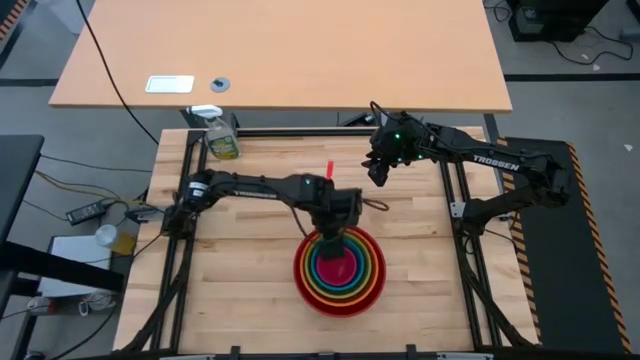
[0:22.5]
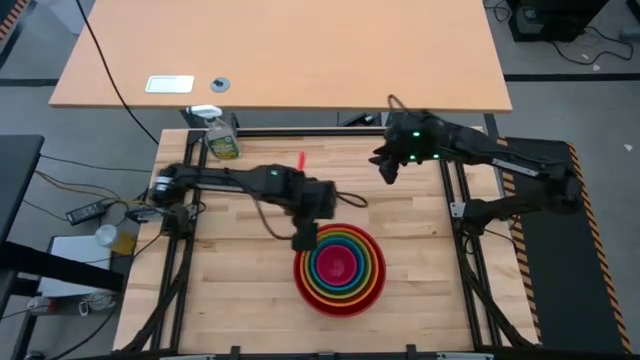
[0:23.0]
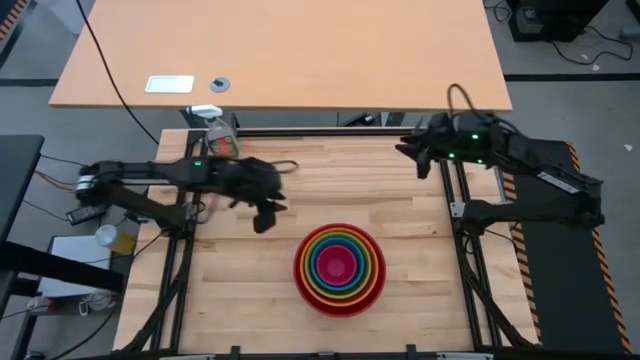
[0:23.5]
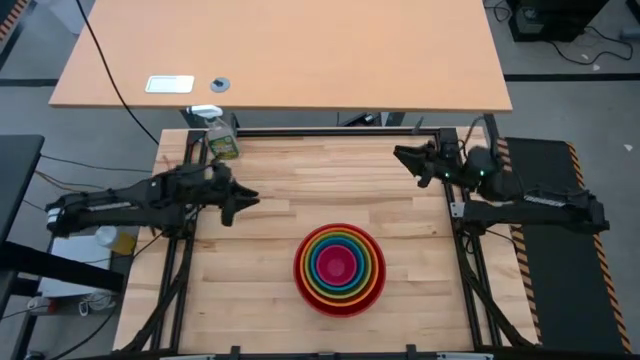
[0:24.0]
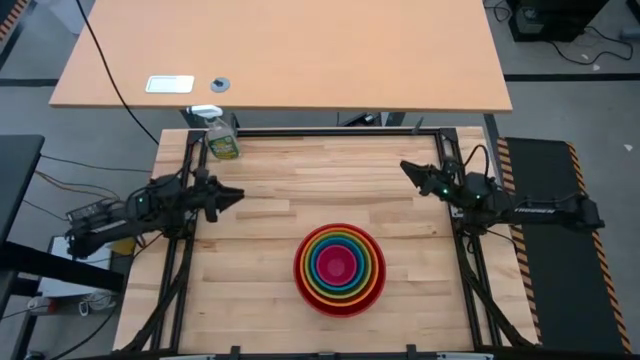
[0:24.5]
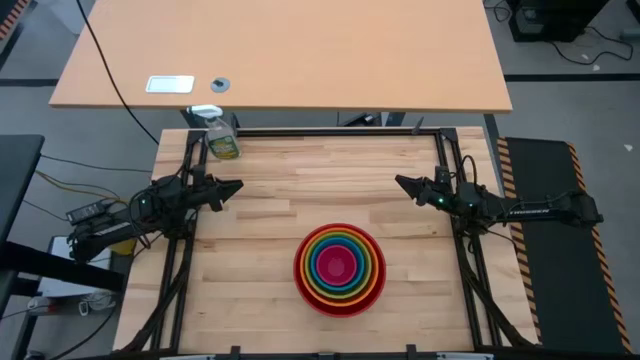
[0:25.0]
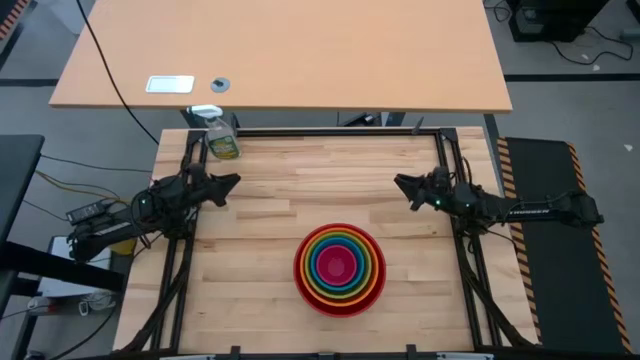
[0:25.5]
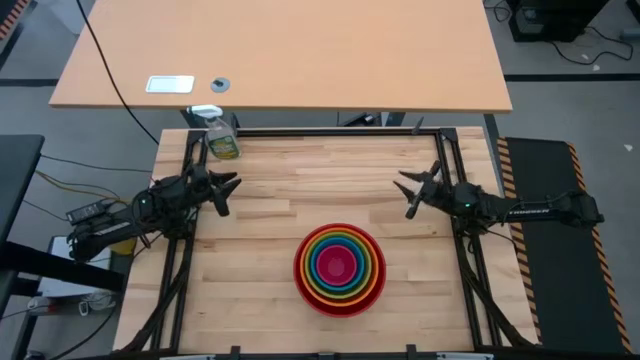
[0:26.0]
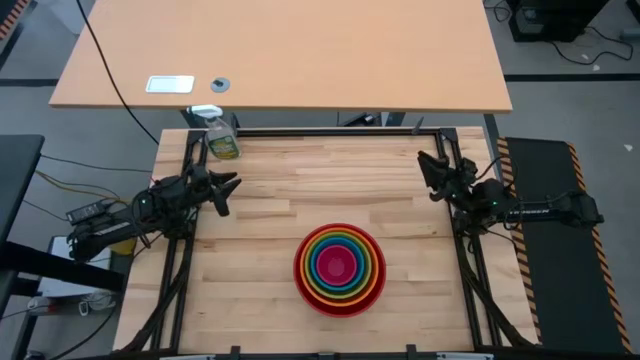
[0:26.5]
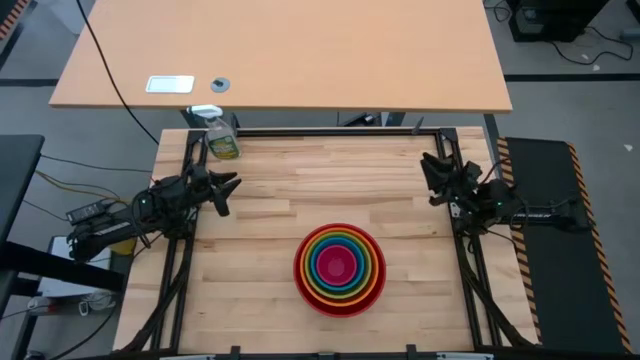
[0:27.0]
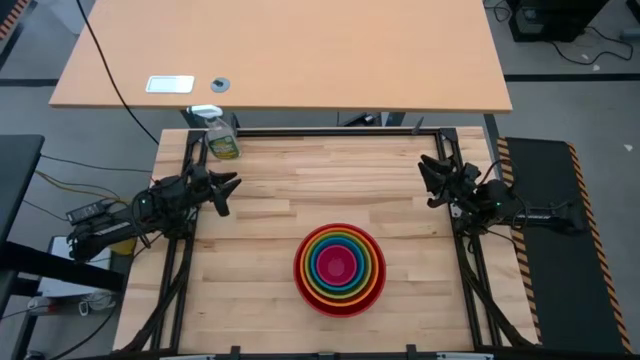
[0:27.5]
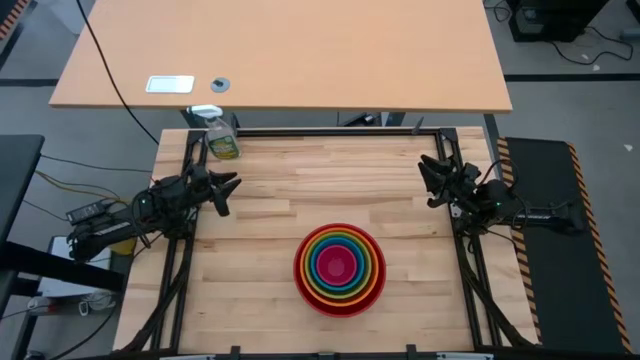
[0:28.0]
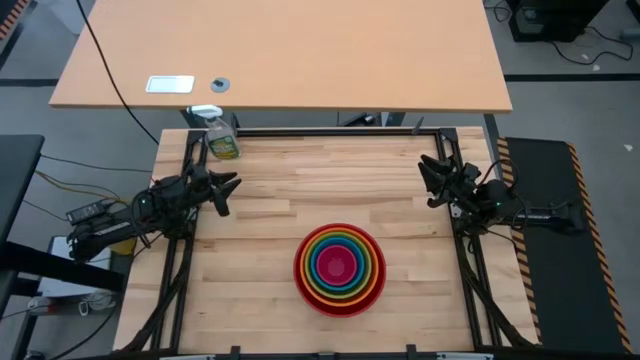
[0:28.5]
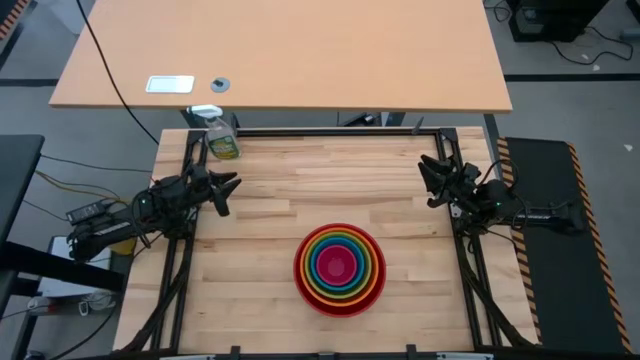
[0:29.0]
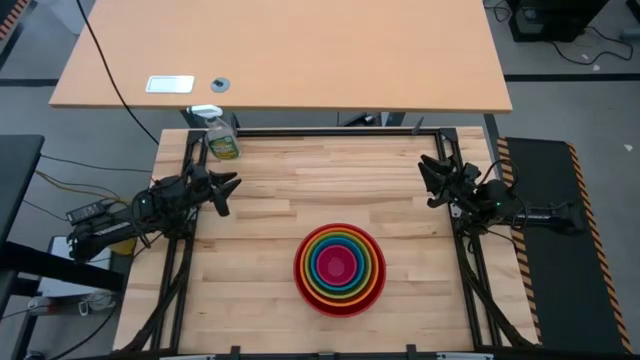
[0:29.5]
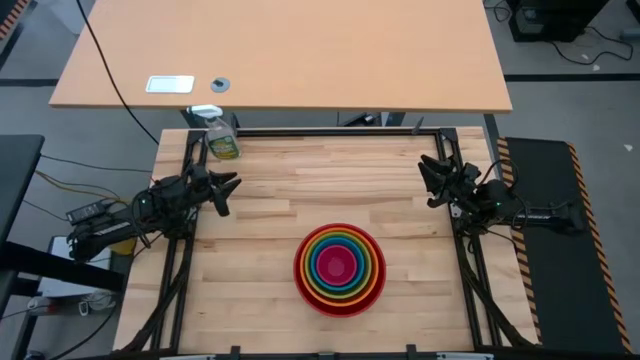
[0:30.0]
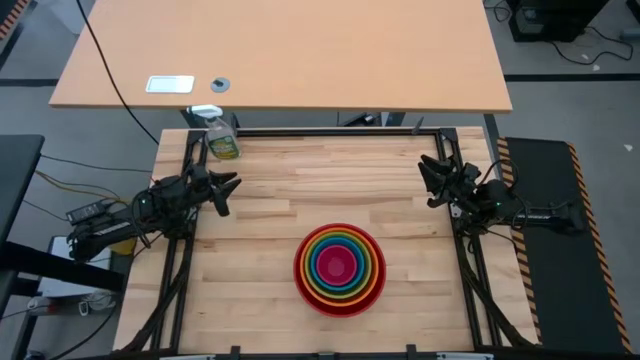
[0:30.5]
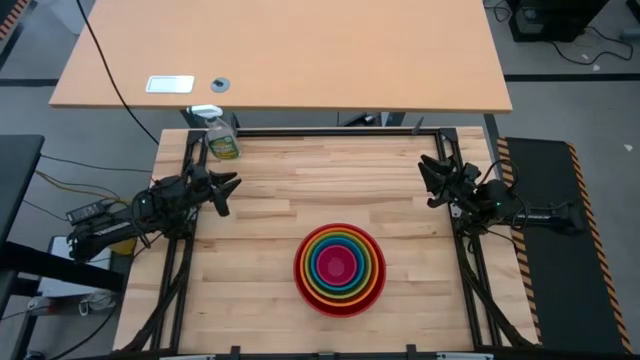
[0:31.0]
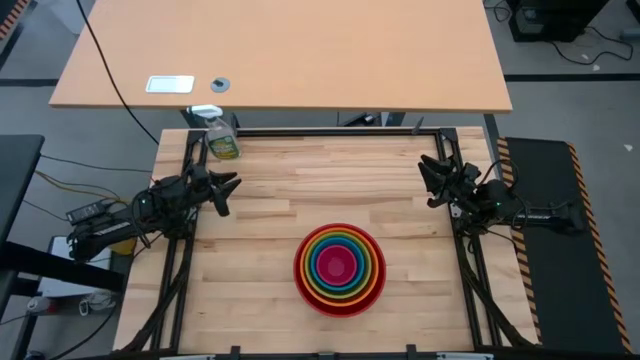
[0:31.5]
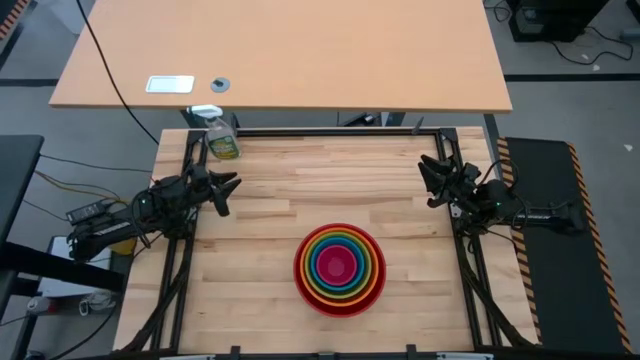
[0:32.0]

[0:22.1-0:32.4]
Return to Home Position
